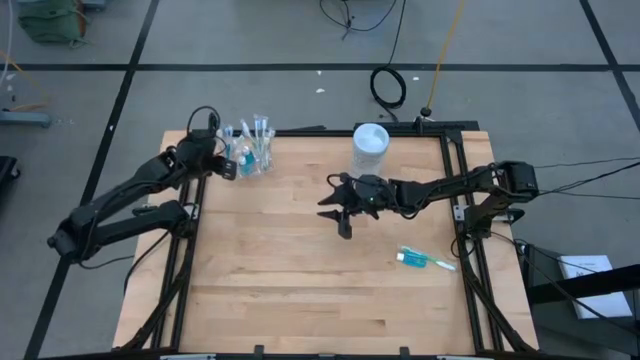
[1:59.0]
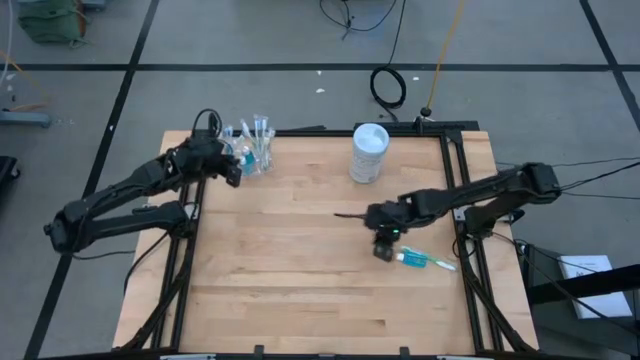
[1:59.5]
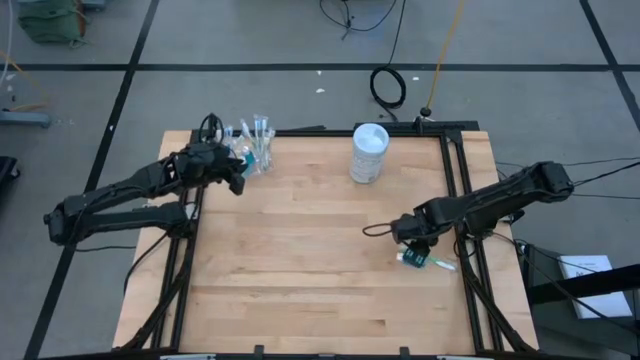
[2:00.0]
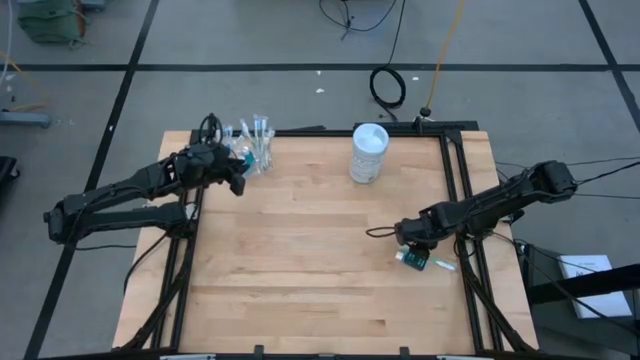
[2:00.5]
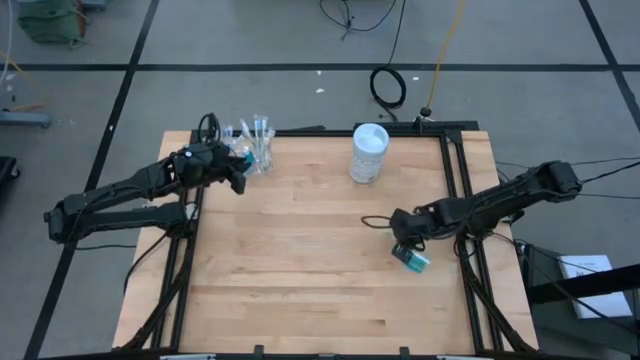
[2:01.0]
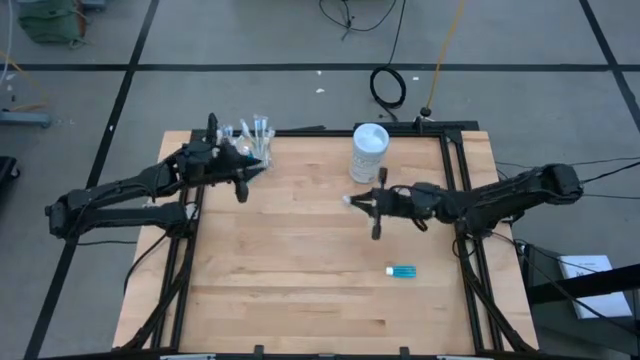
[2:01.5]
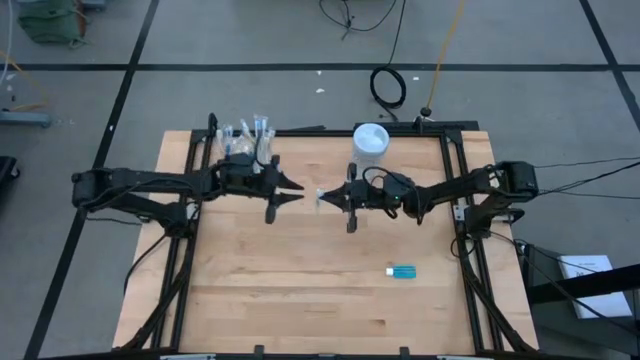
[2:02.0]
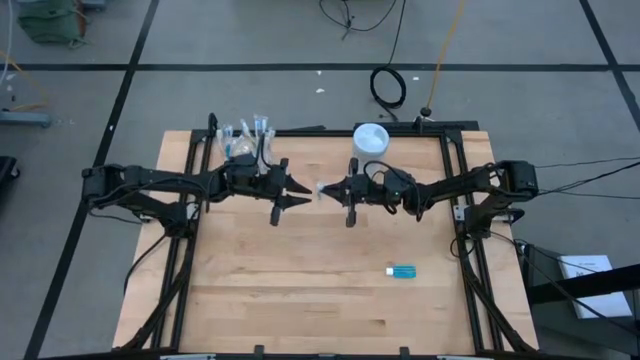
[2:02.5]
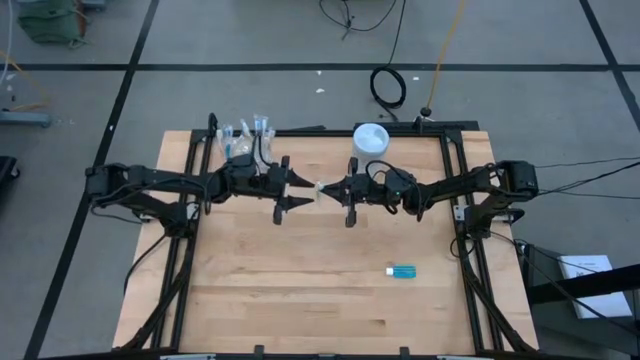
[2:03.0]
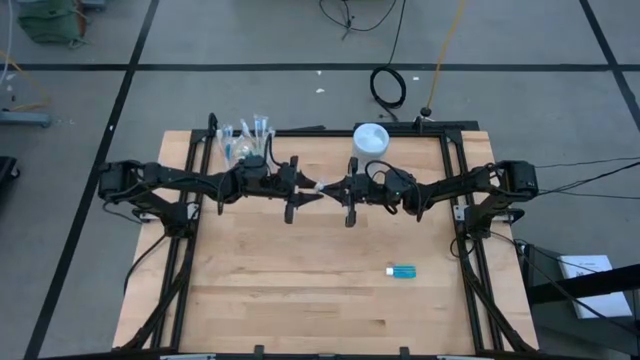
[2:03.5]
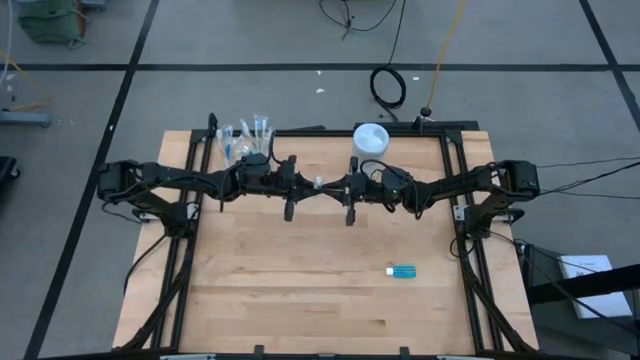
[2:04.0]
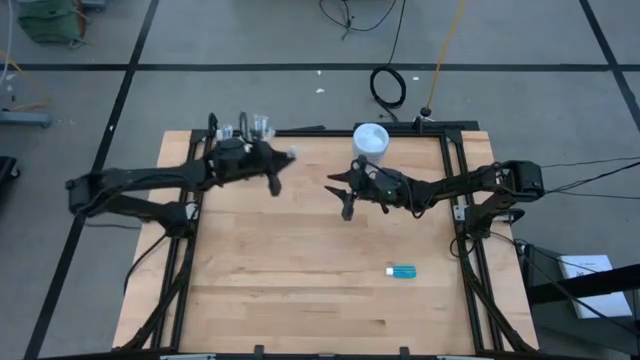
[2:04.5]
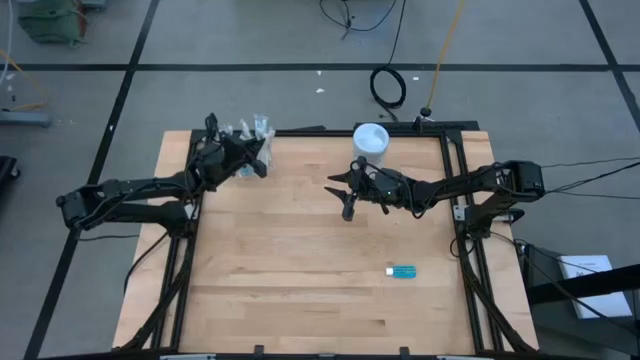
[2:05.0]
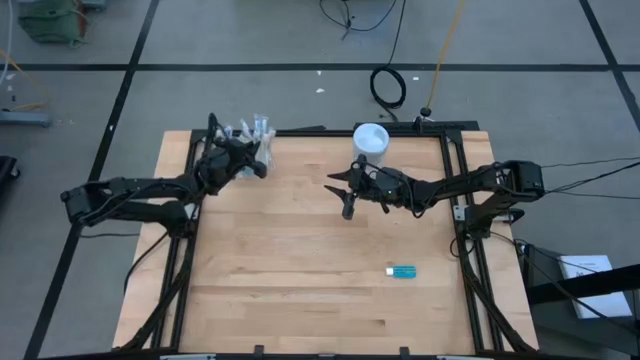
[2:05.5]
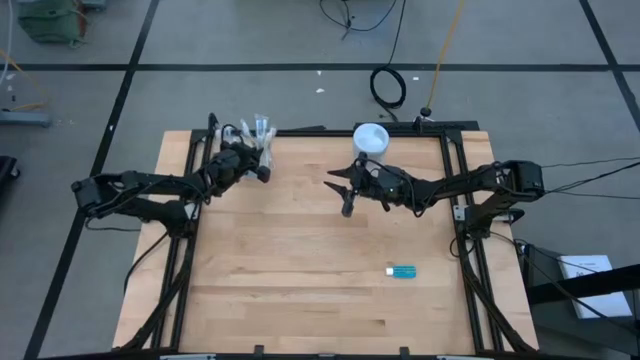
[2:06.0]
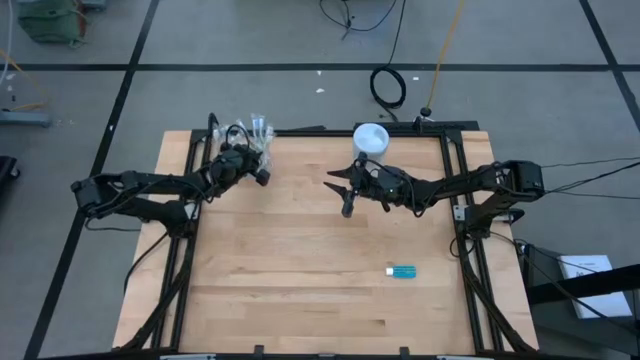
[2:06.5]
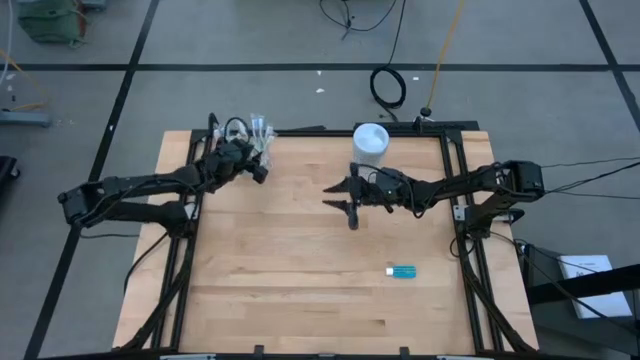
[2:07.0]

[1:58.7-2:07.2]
Task: Pick & Place toothbrushing station
Put the green toothbrush into the transparent organizer

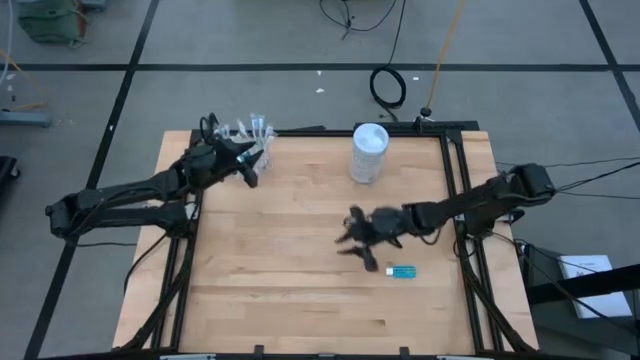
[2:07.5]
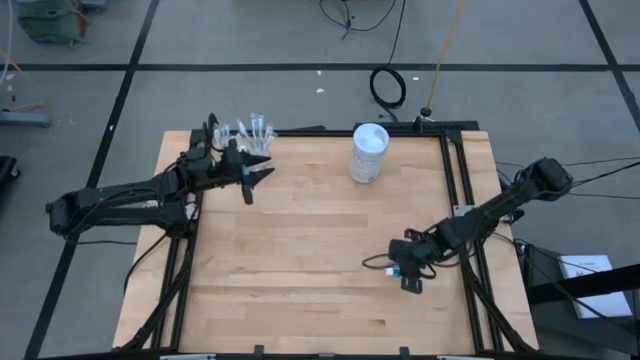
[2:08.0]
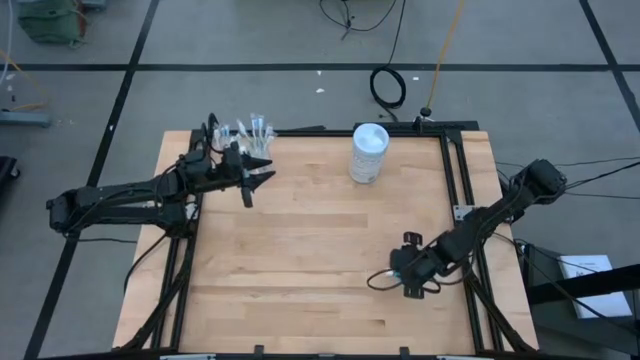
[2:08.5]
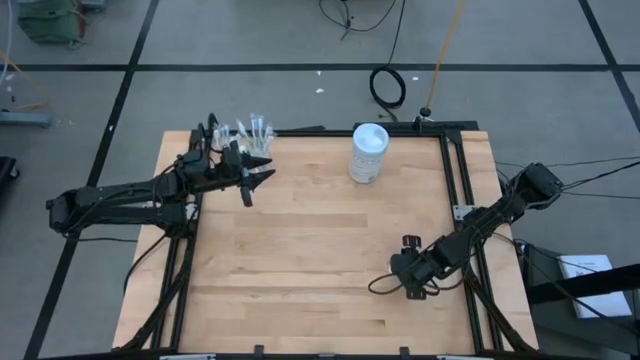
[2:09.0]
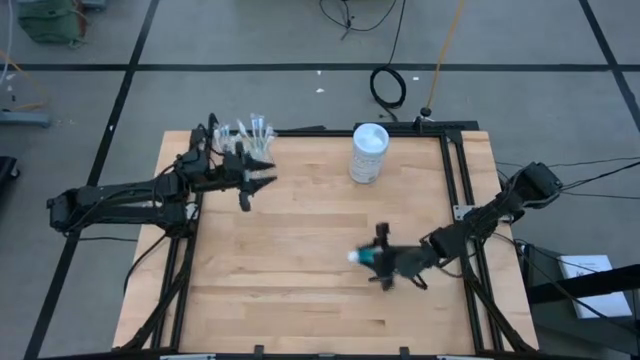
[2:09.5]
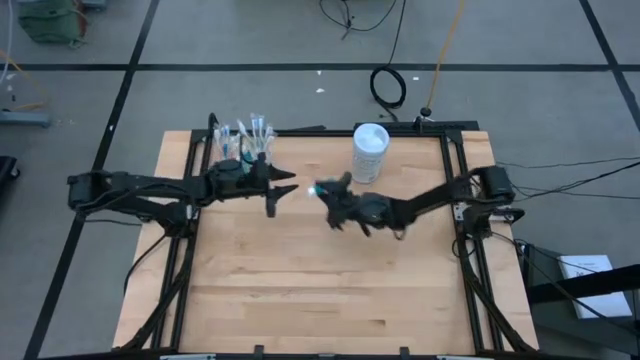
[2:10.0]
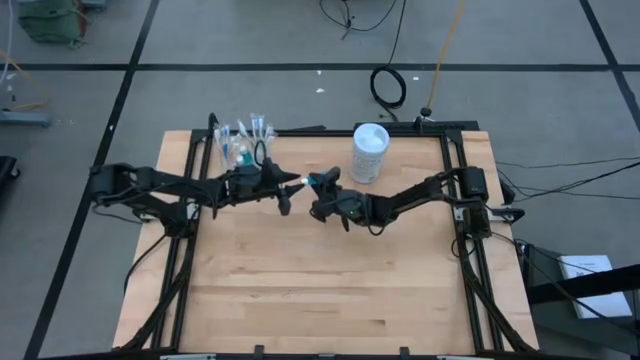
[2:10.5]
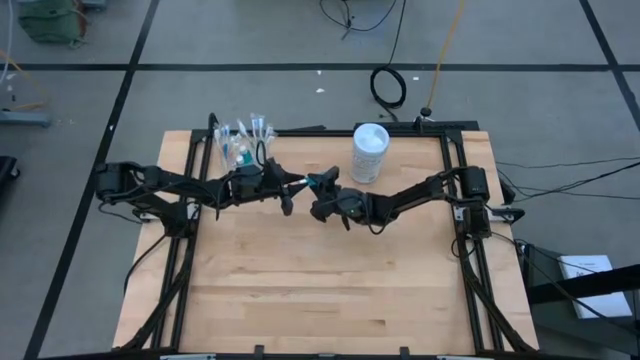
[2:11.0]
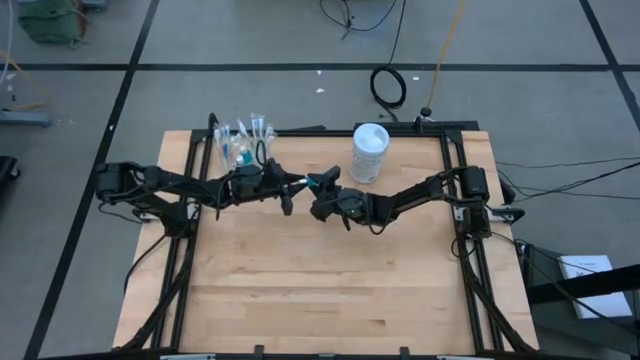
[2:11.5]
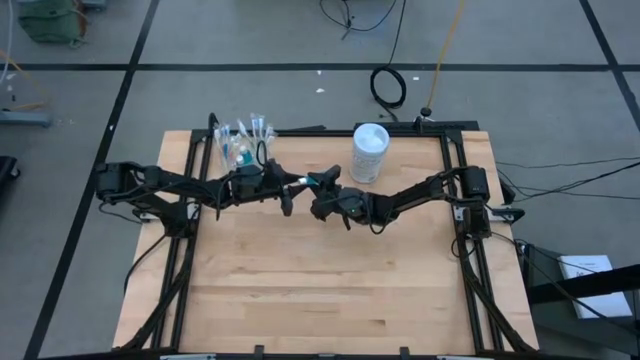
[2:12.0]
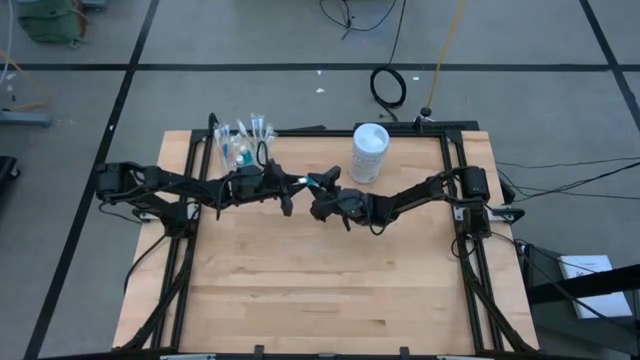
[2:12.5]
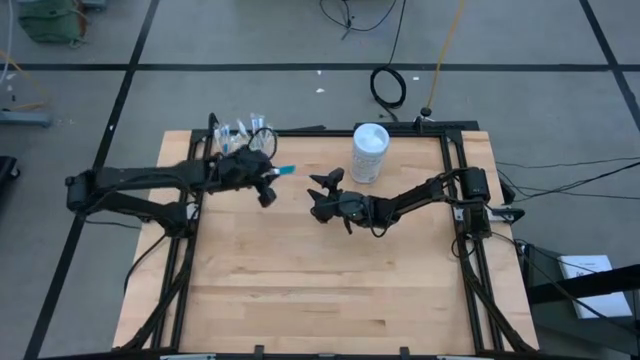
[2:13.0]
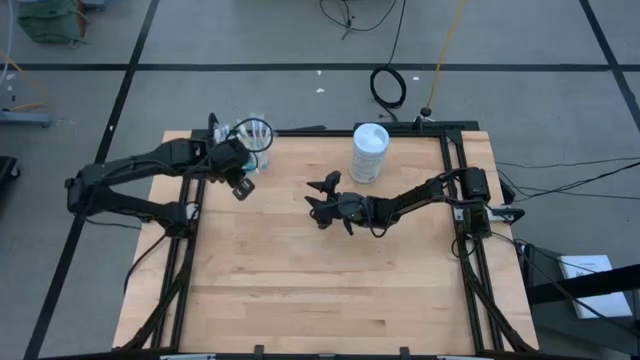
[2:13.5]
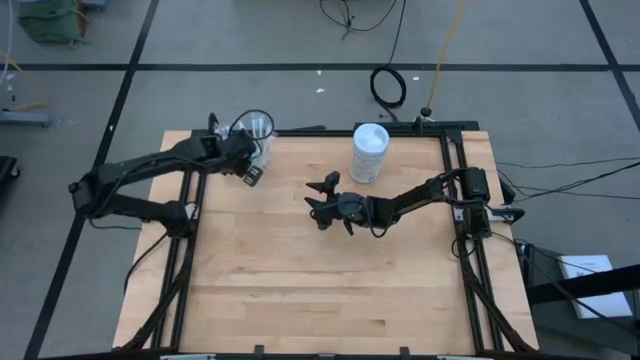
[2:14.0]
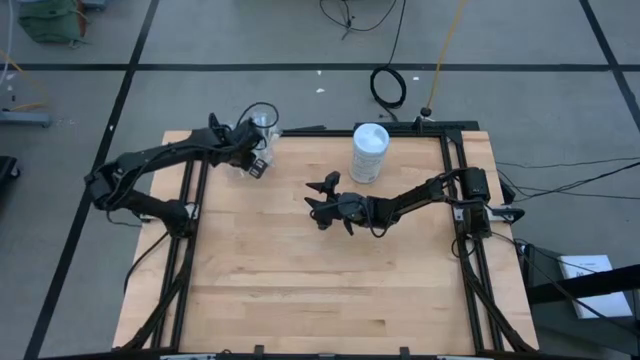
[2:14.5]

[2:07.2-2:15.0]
Put the mouthwash into the transparent organizer

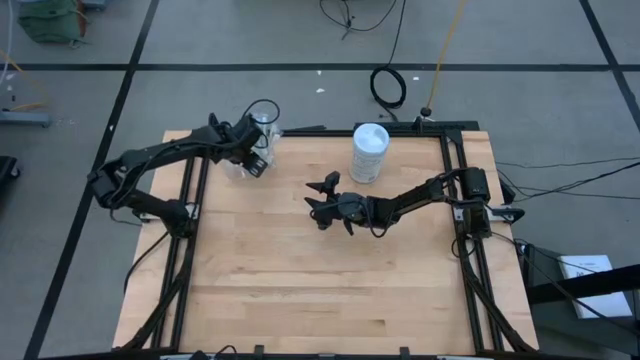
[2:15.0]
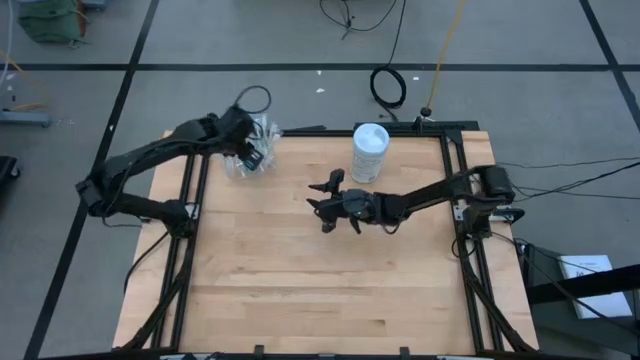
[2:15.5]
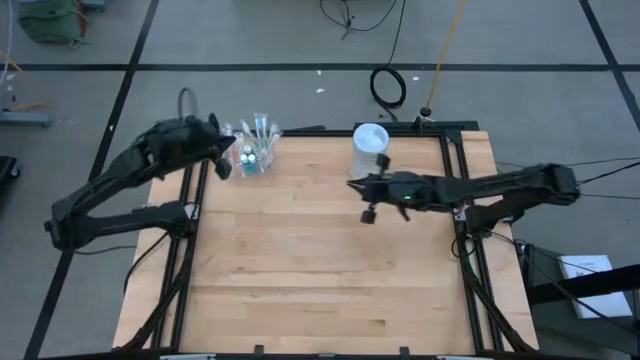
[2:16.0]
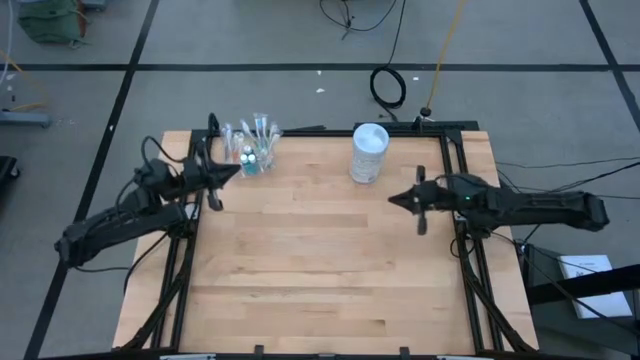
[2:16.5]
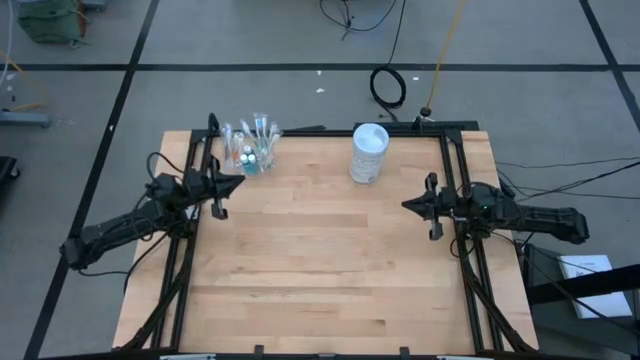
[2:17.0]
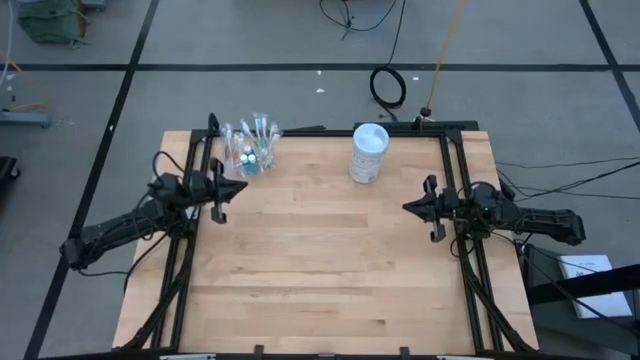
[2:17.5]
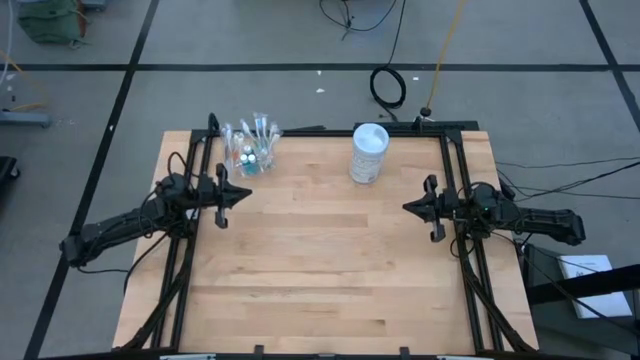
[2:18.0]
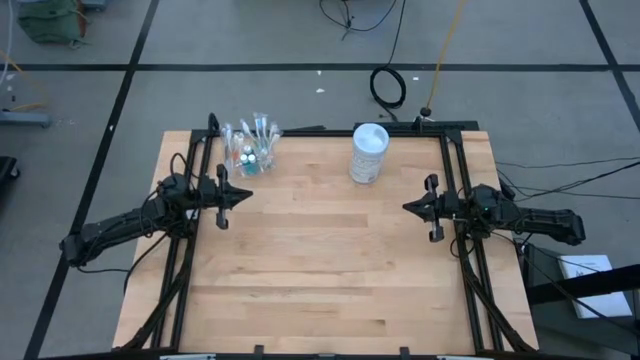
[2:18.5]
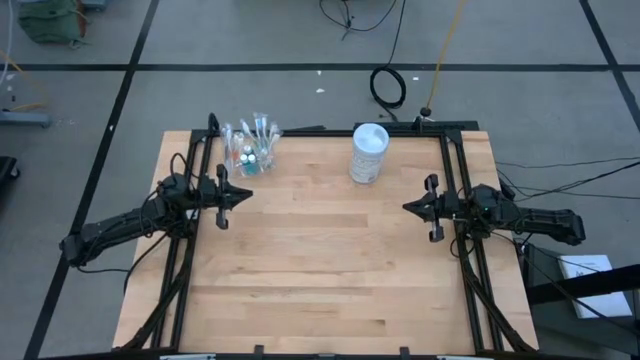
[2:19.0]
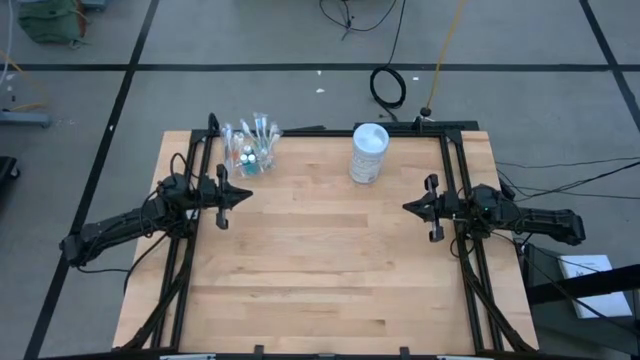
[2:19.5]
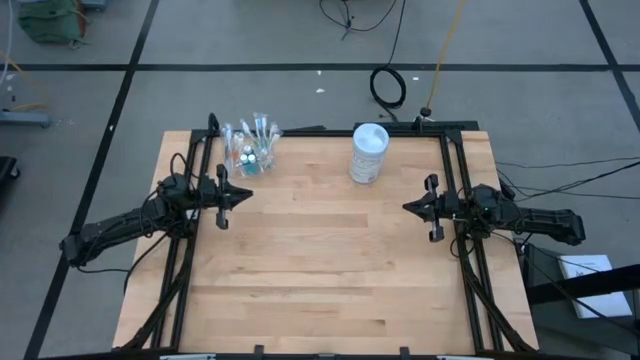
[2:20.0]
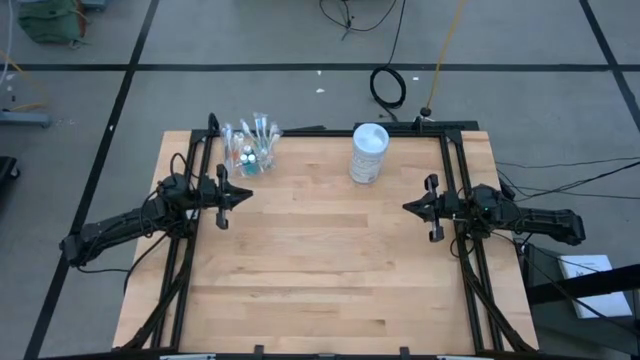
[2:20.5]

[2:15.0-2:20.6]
Return to Home Position
